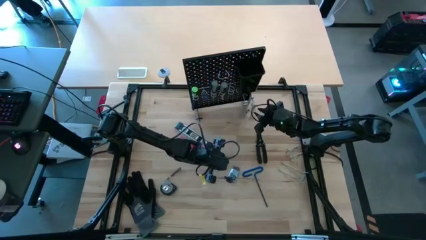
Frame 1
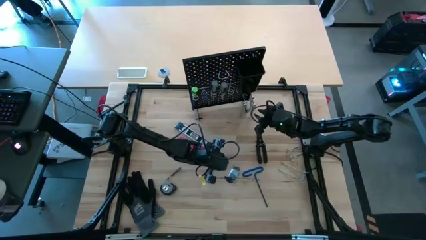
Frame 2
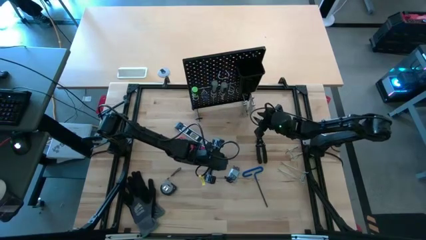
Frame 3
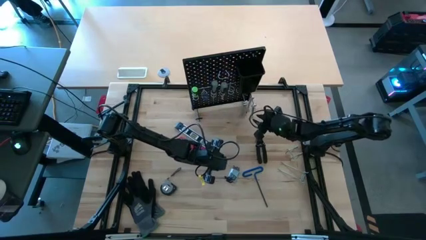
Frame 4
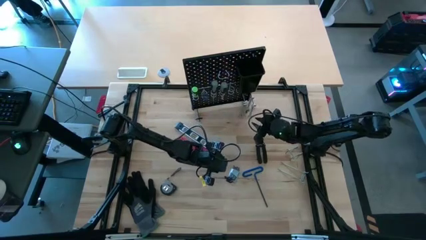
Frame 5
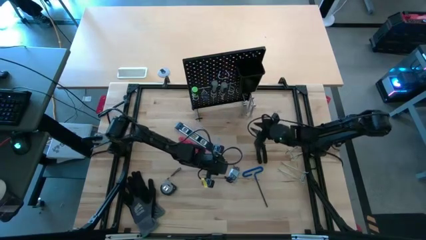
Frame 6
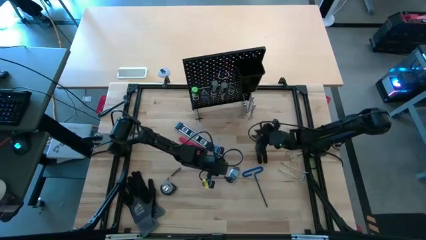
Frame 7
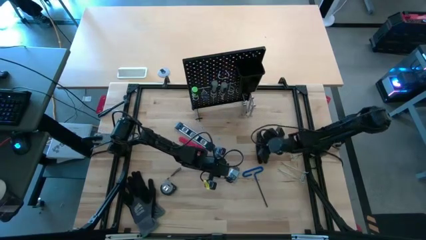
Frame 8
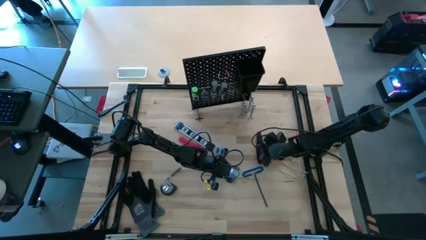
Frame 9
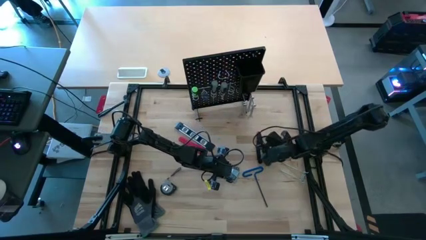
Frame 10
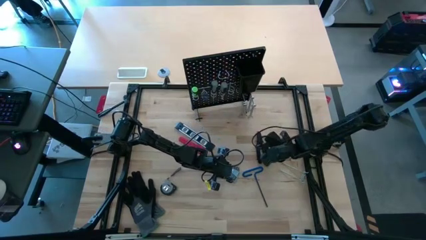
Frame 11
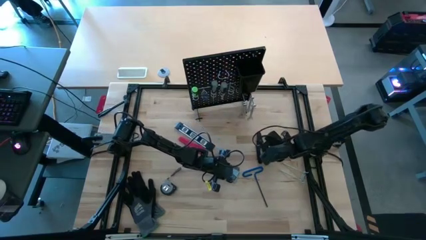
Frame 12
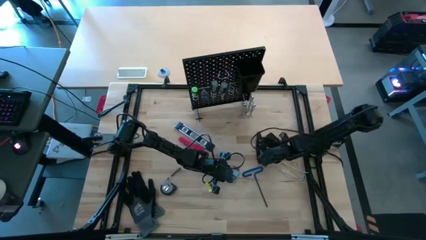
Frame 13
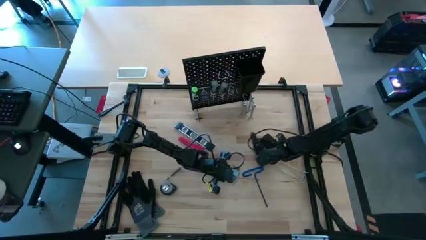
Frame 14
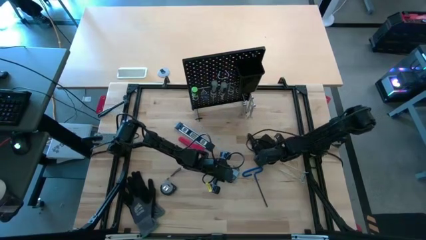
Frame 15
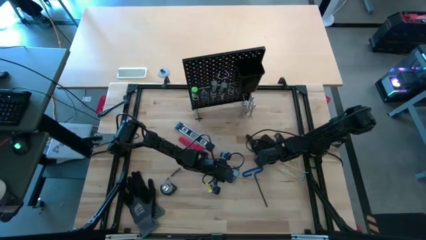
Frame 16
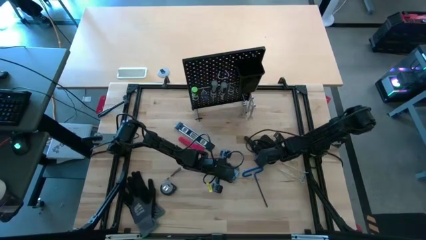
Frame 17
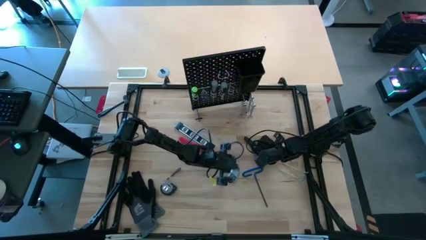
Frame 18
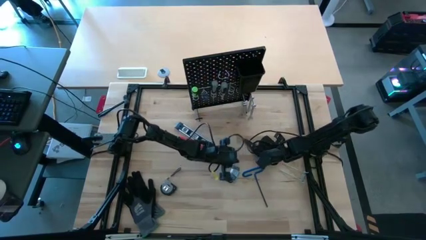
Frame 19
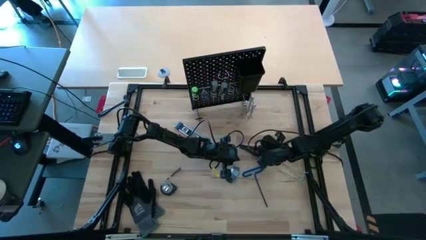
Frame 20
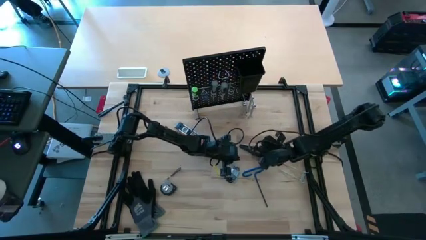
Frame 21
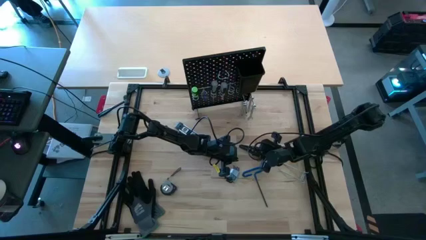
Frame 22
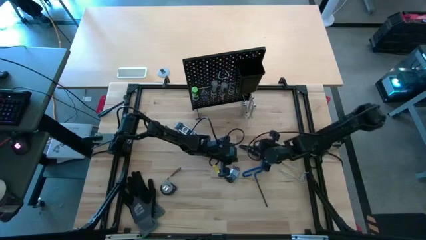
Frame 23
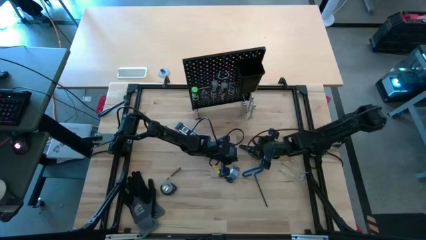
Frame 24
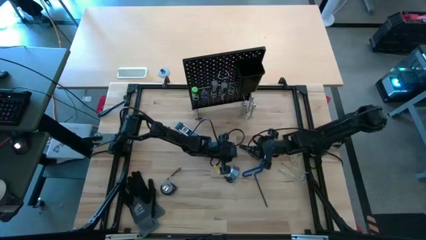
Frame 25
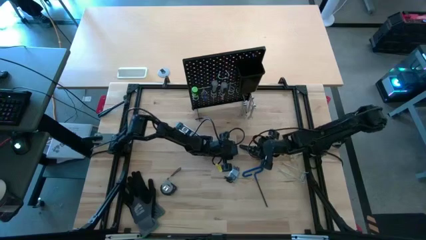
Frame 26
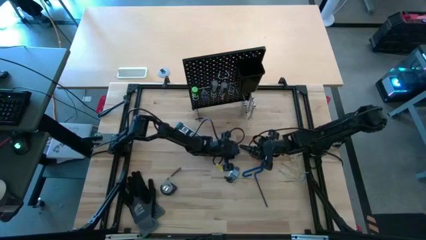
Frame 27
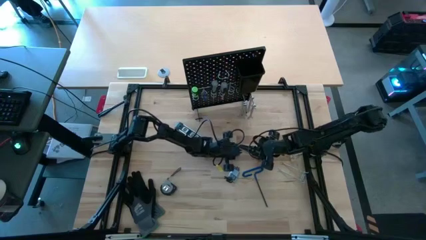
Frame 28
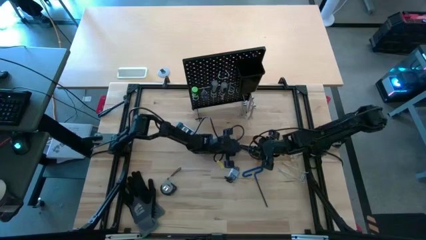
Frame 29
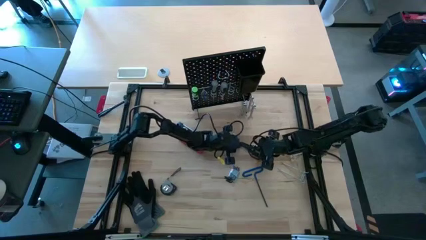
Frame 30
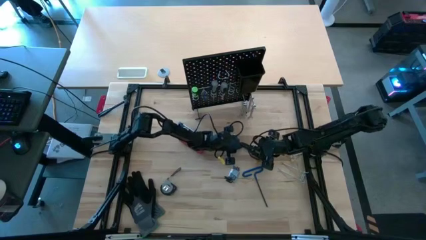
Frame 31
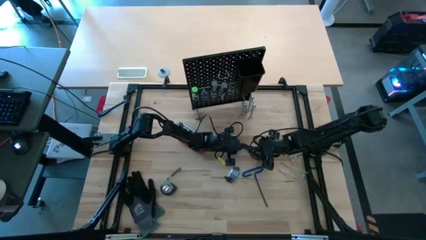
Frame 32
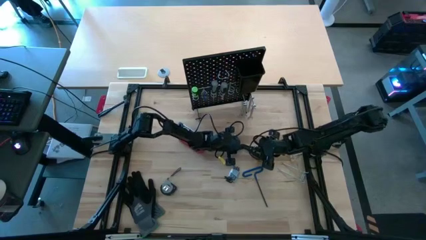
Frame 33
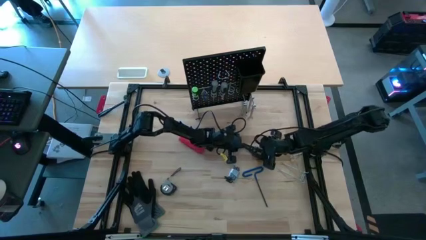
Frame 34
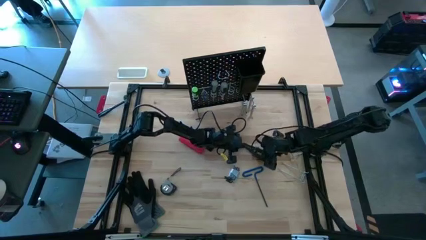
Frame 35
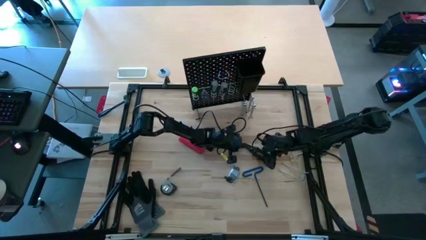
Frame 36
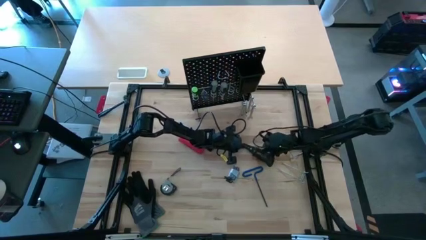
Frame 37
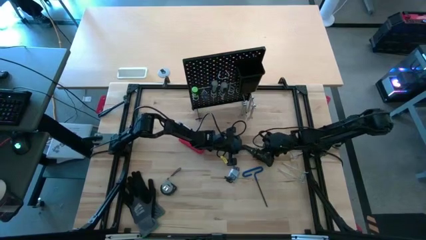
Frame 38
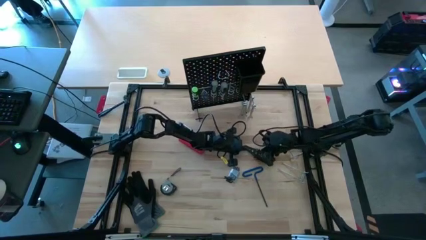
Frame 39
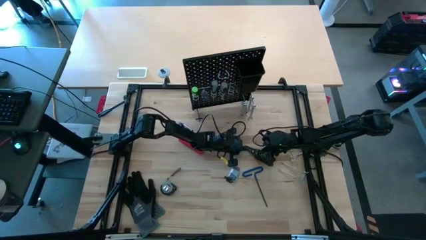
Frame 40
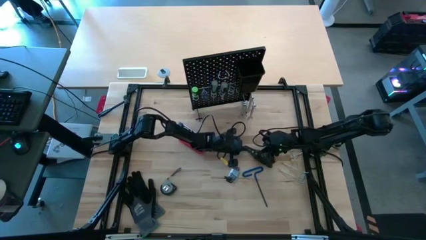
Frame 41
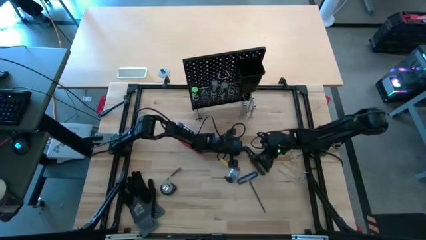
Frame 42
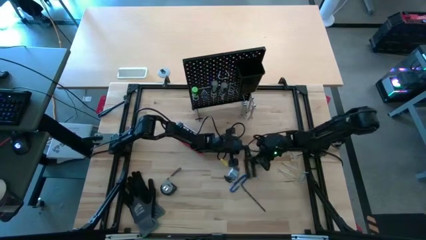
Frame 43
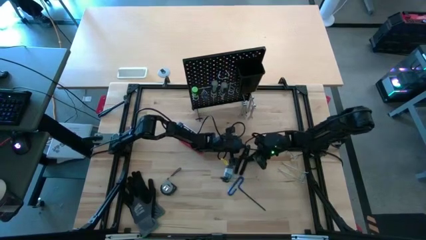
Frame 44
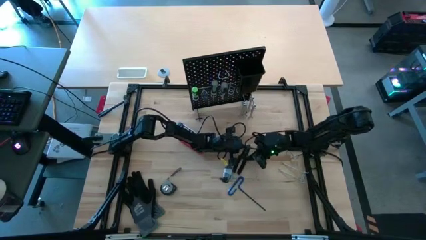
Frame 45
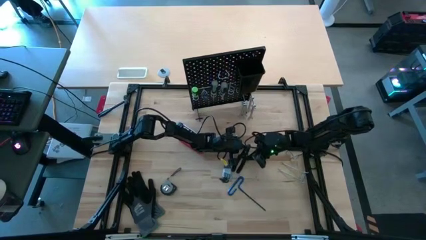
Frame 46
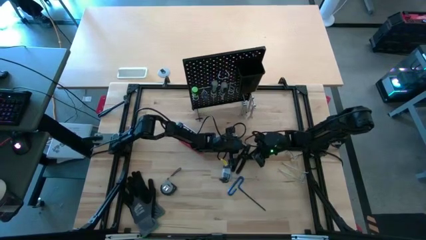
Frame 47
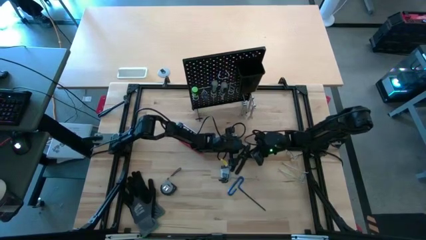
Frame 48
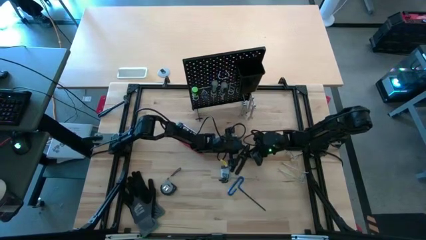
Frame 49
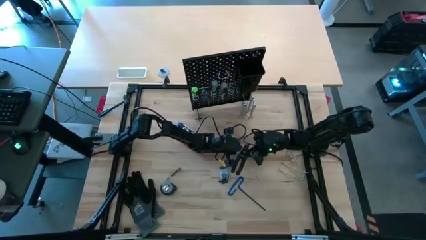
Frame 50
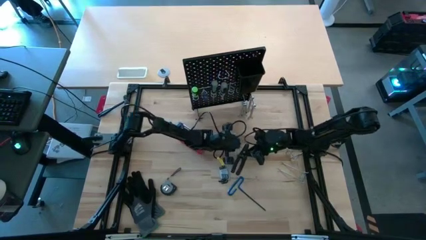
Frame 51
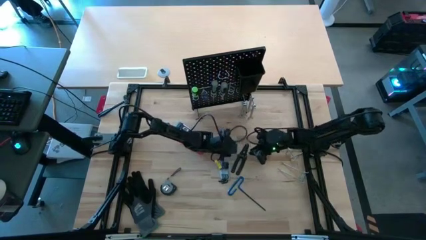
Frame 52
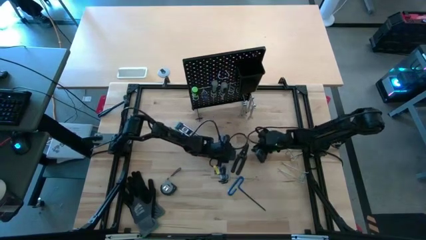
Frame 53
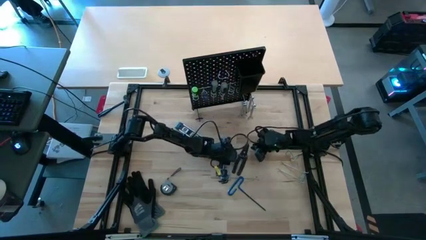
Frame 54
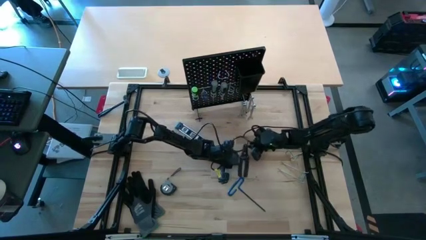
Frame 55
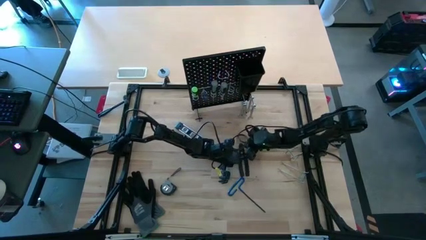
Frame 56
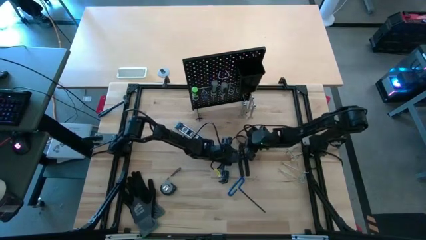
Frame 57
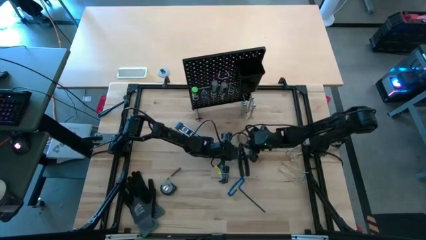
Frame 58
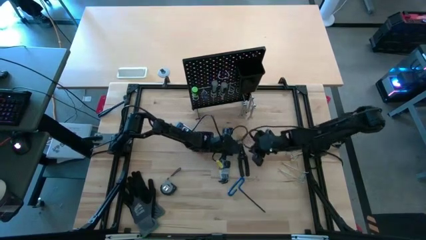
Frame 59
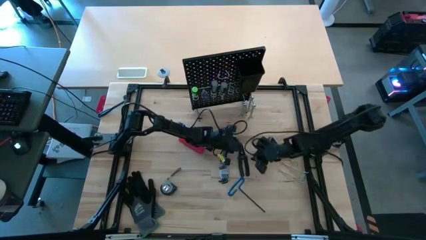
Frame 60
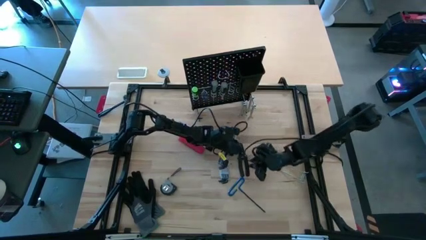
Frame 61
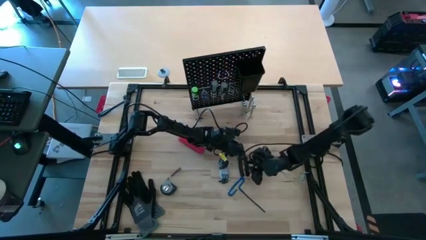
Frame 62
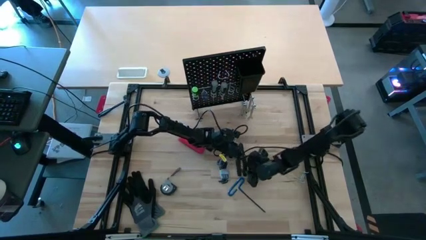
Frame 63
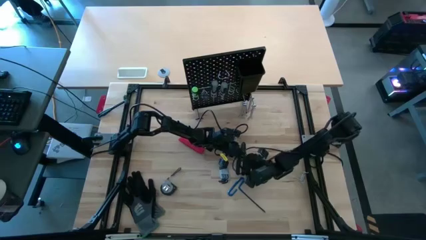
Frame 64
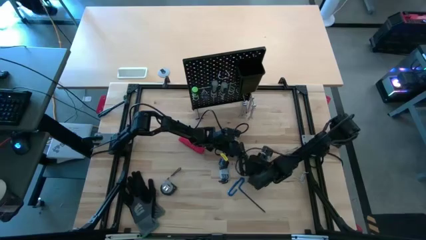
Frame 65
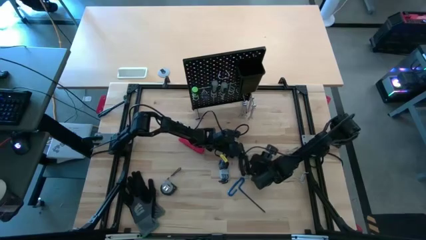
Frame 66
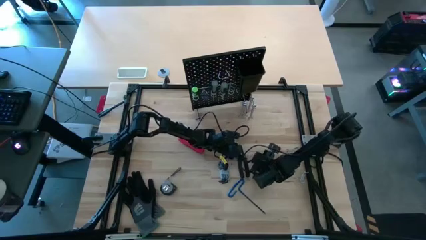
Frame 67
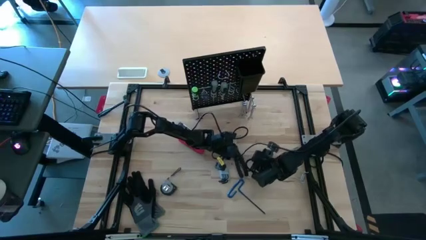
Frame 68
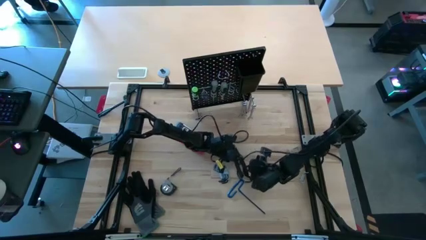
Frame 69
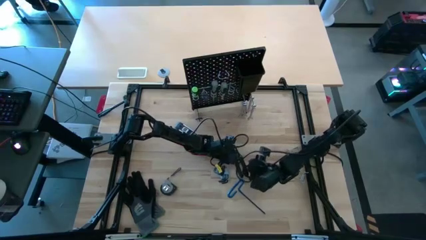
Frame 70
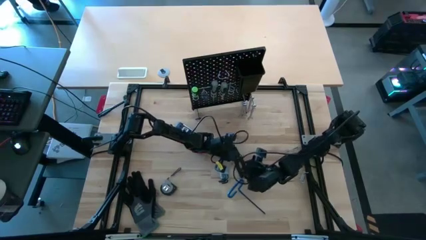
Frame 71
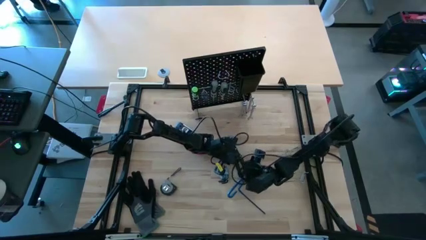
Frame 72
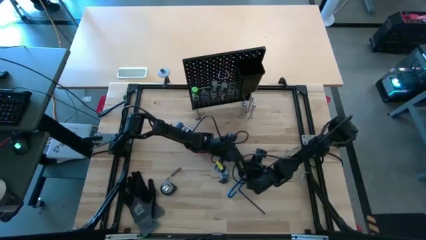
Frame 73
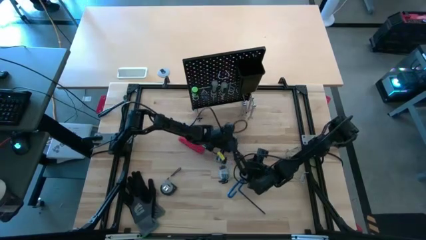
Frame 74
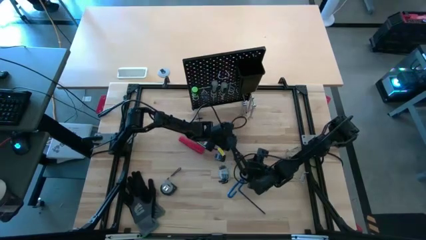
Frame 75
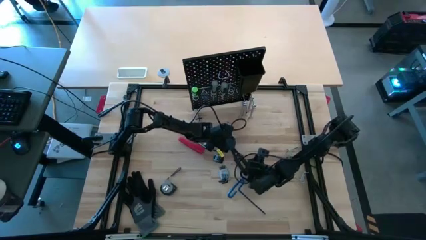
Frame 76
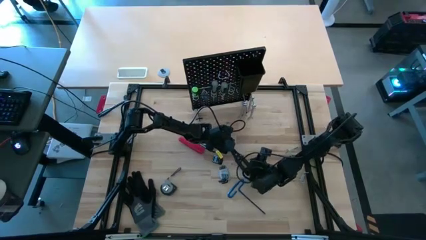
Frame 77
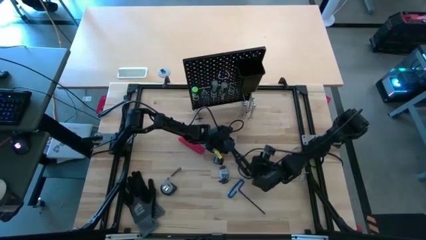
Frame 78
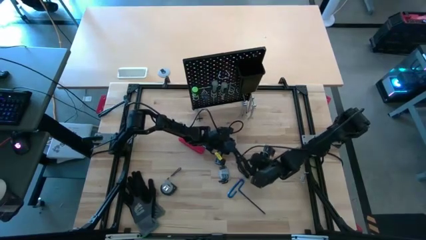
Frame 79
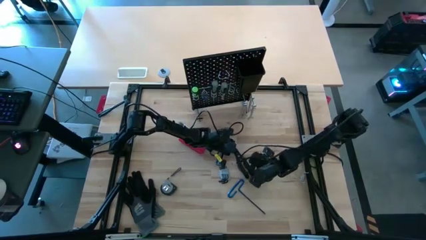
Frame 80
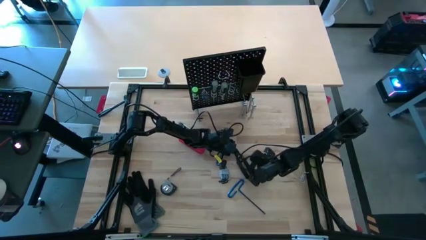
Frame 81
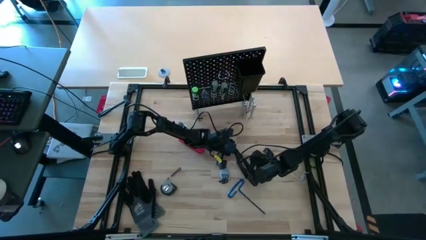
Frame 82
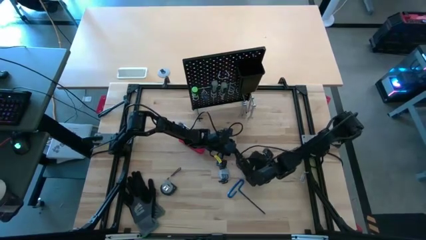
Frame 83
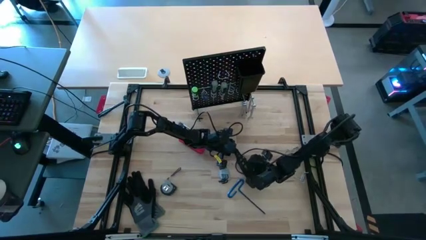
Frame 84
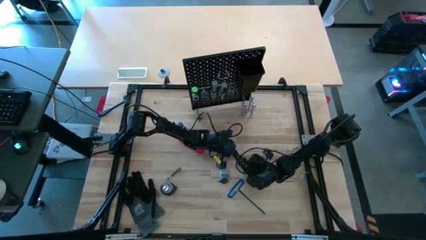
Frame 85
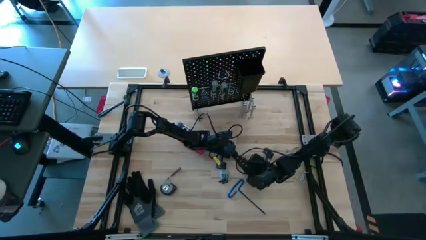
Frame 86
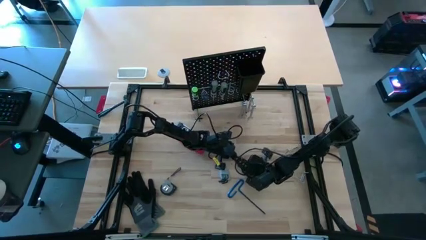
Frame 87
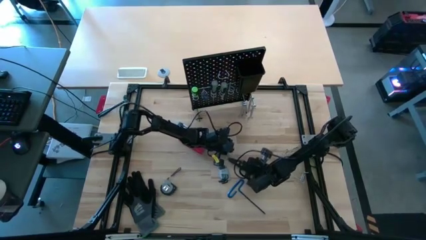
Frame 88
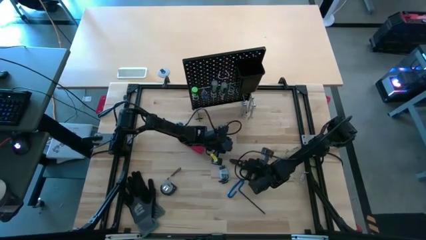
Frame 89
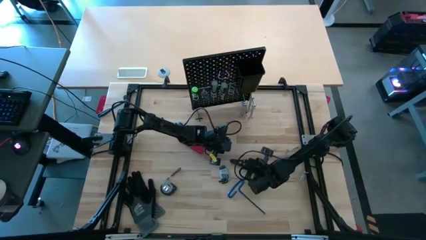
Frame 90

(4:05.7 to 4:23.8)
Task: Hang tools onto peg board
Hang the black wire stripper onto the pegboard
